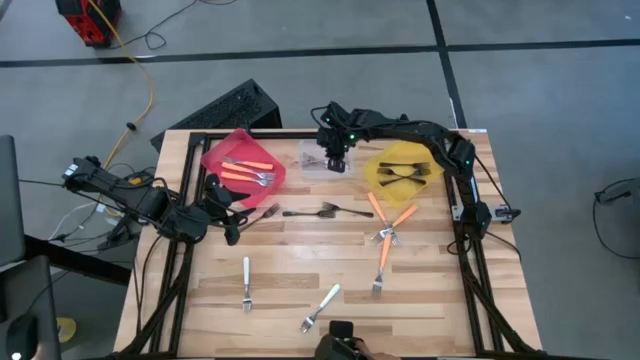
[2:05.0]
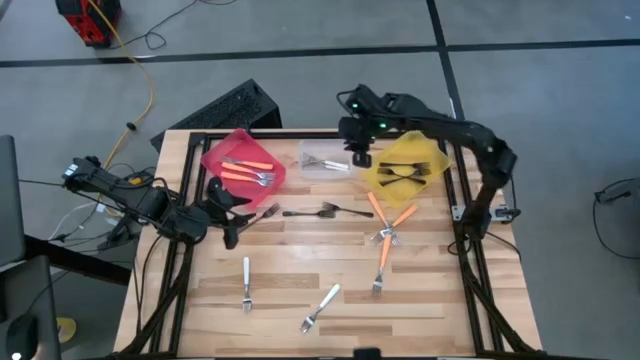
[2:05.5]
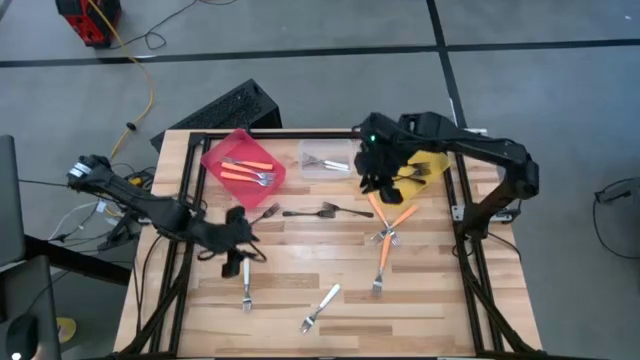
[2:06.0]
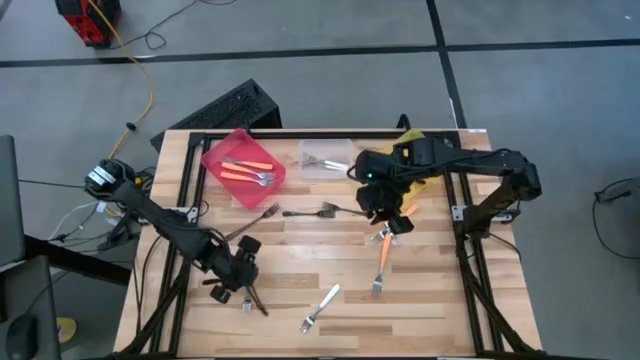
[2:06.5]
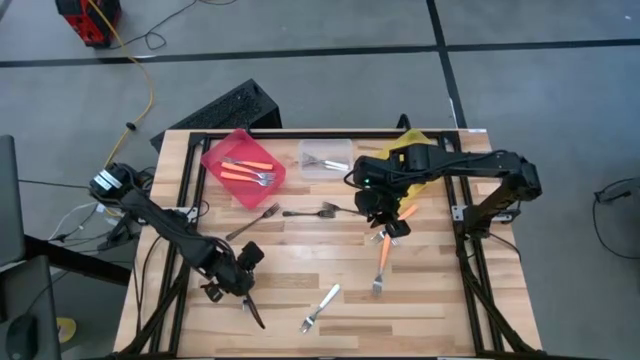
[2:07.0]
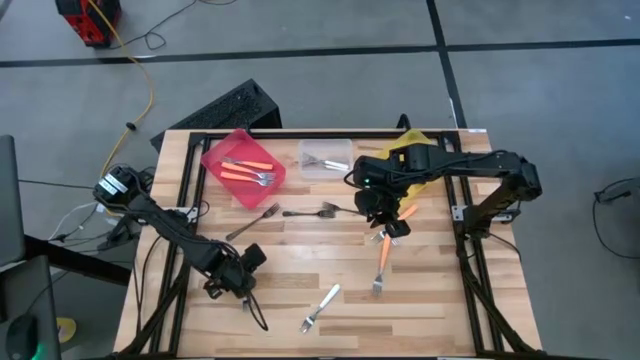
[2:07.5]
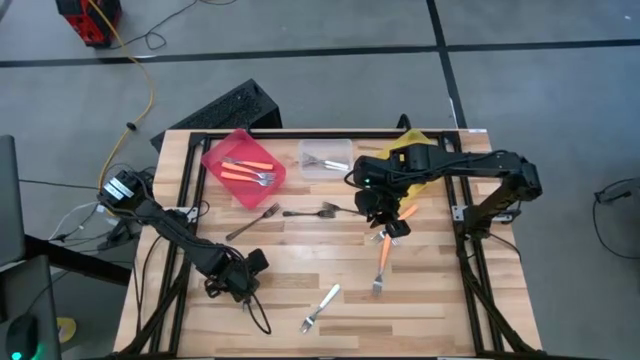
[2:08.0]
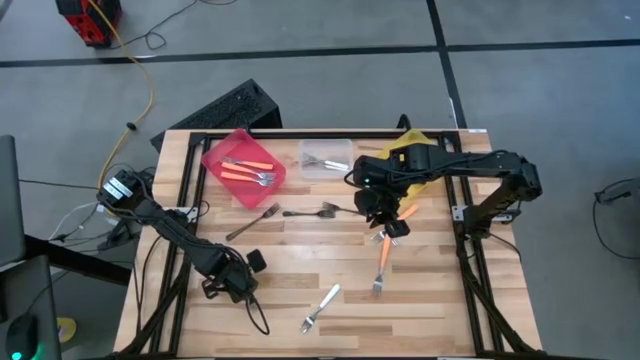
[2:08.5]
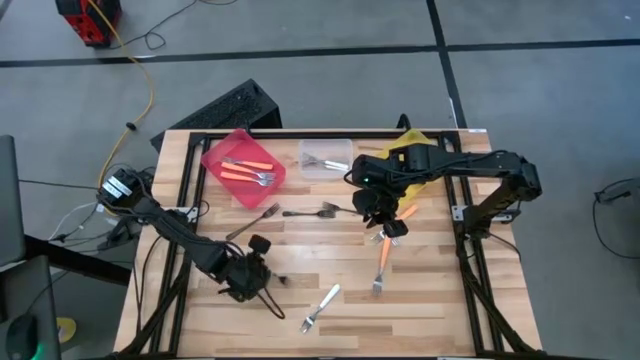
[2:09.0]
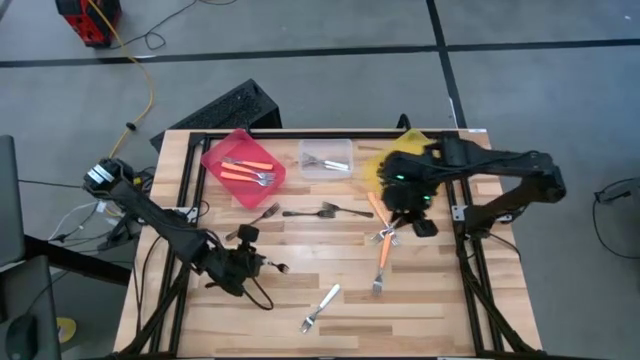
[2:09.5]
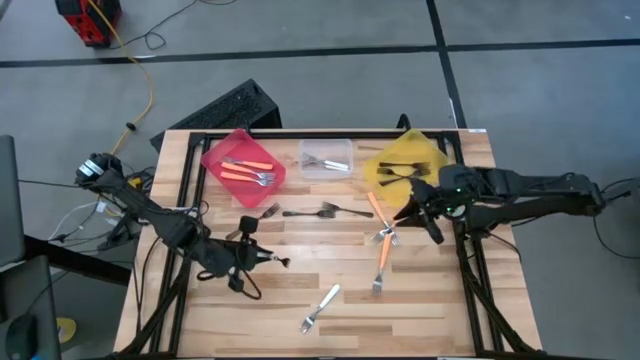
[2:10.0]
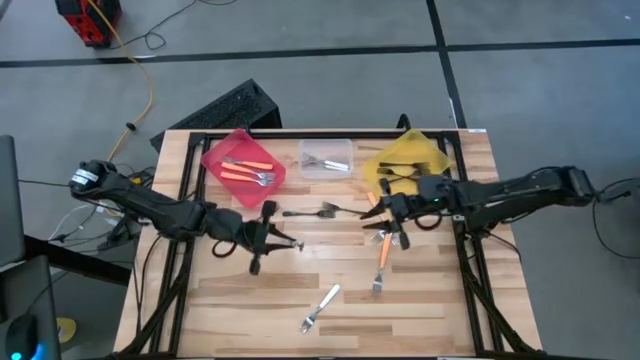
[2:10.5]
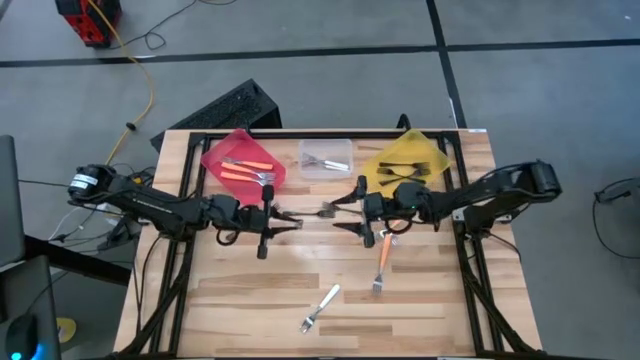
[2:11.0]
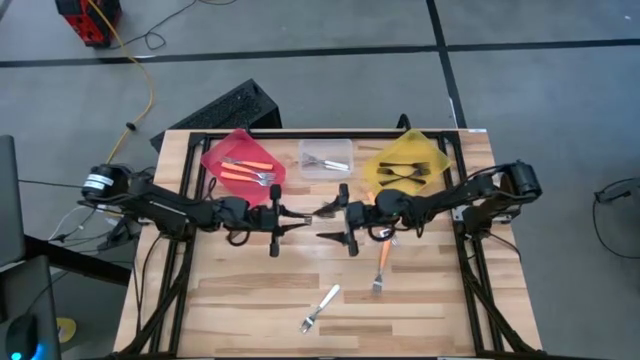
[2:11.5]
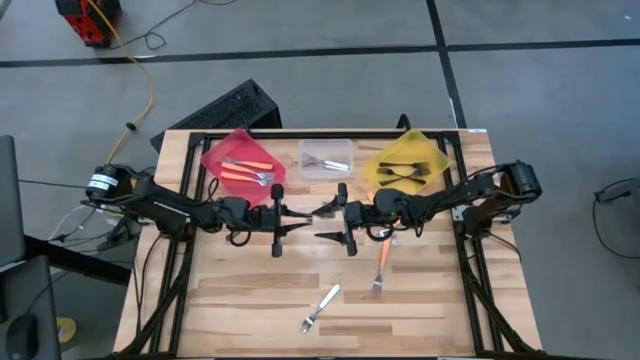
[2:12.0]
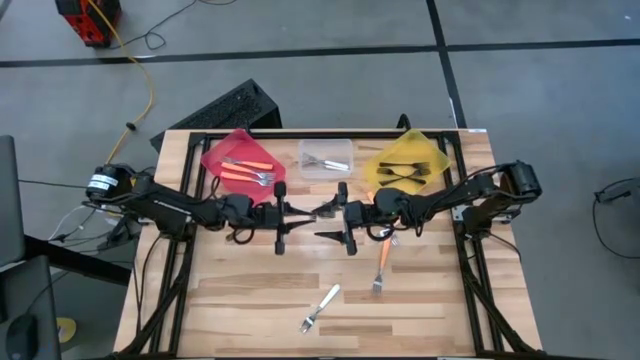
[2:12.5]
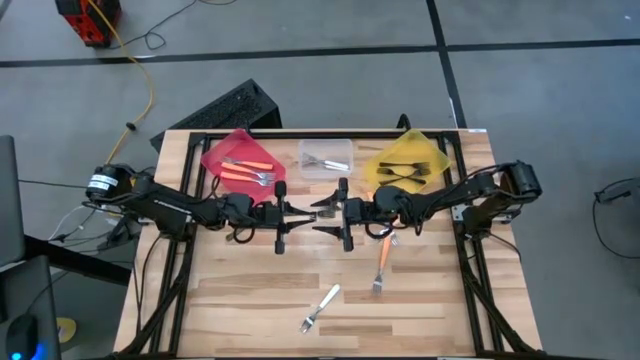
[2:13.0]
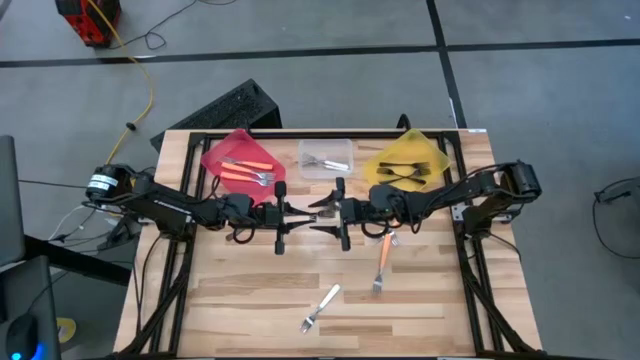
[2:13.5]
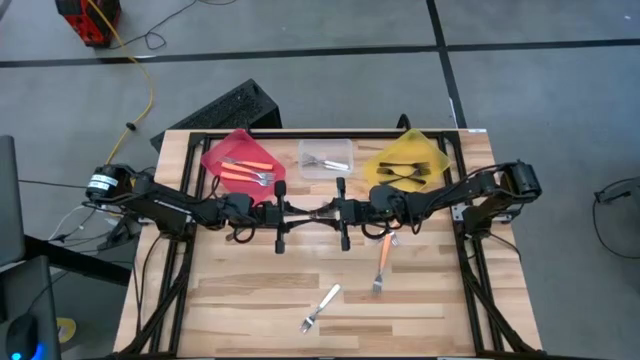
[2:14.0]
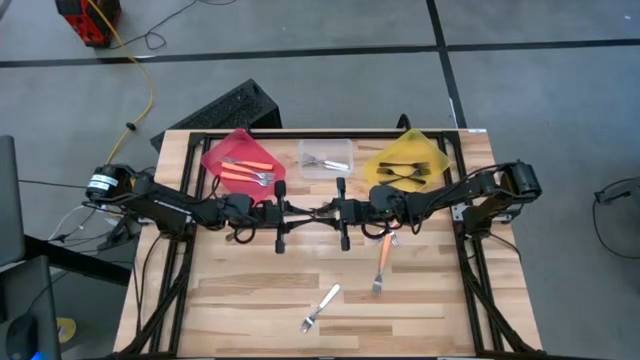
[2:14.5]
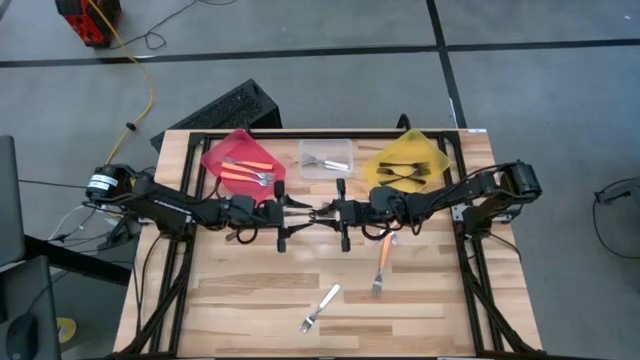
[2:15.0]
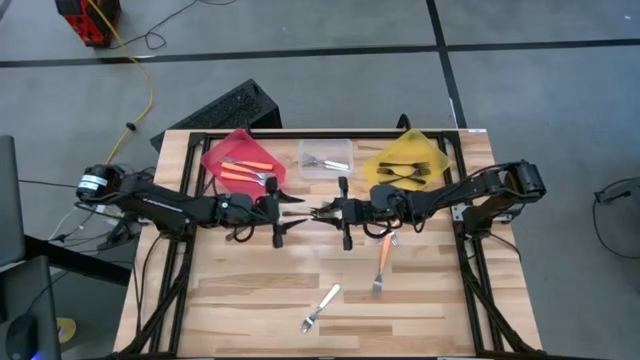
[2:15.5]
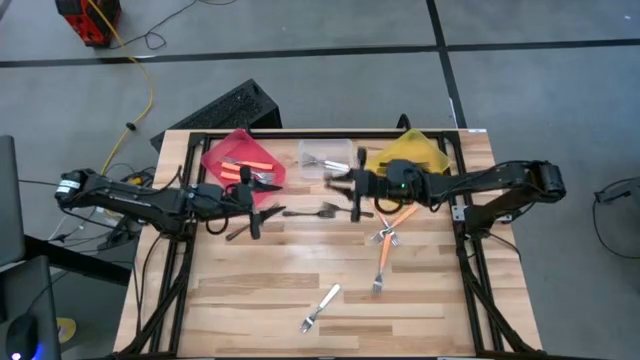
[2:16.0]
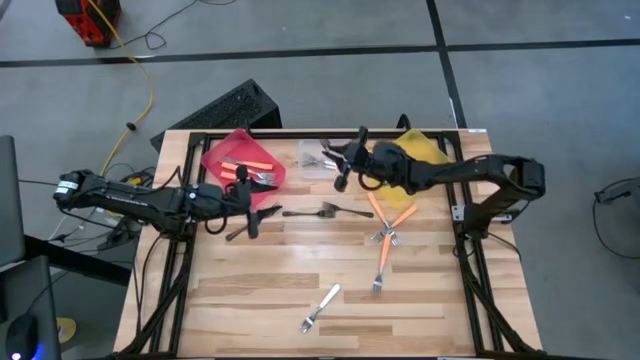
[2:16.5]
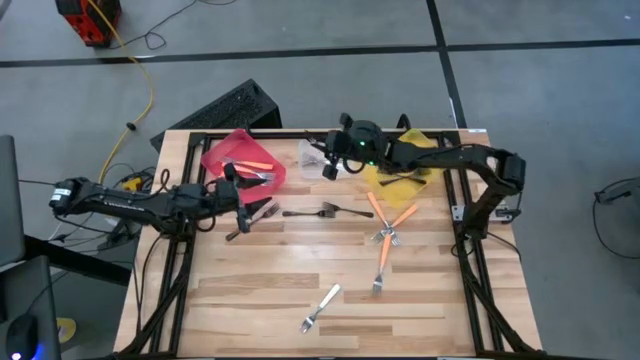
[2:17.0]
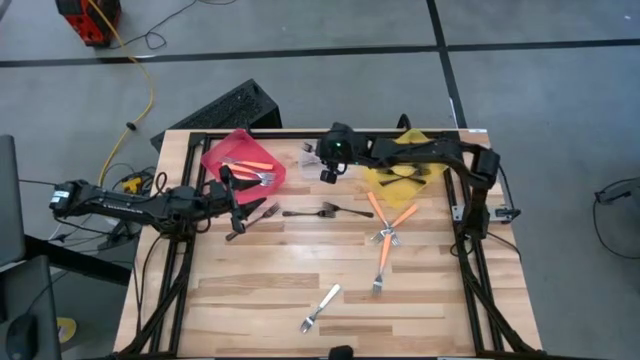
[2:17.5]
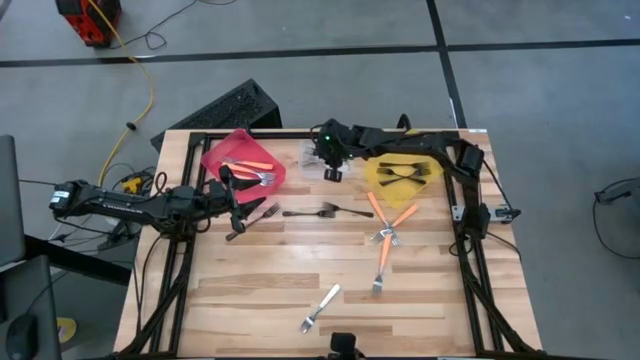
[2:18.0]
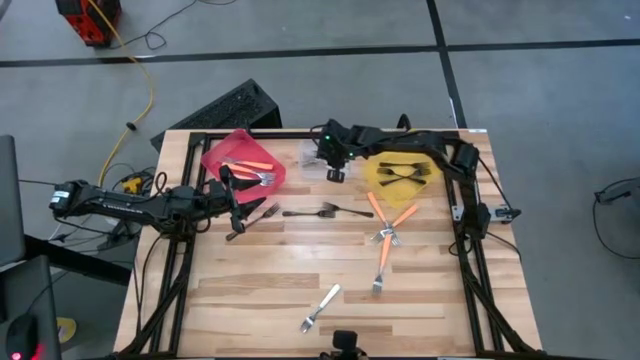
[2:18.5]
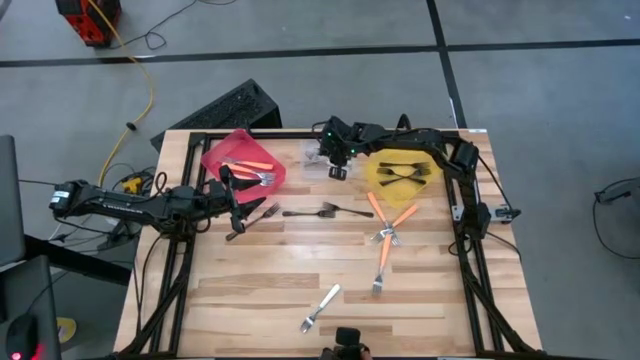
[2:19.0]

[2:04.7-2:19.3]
Task: Sort silverware by color (type)
Put the white fork into the transparent bin

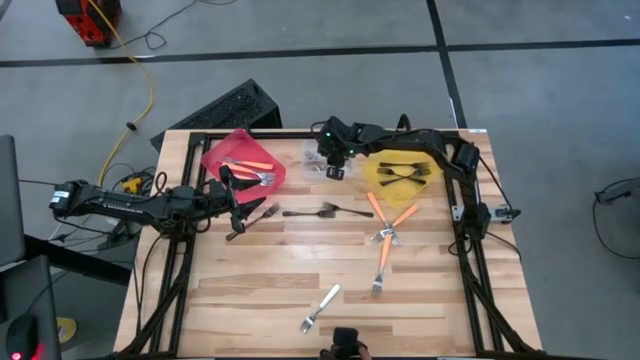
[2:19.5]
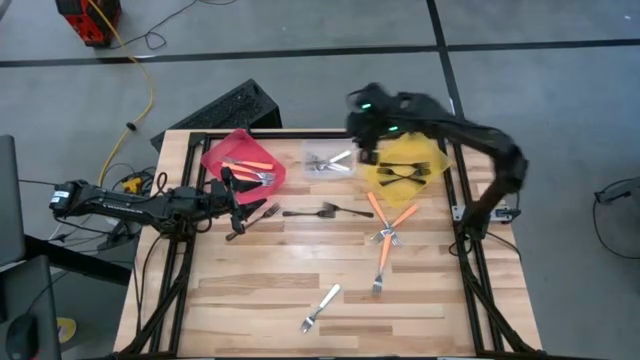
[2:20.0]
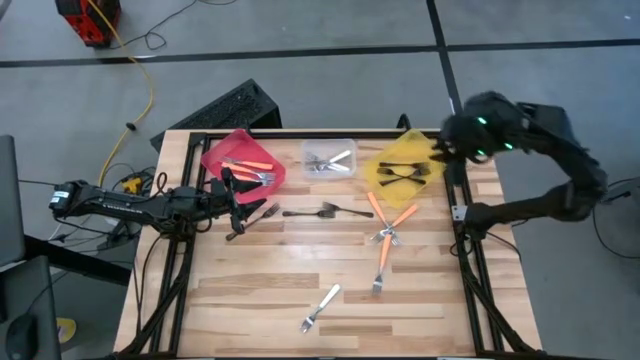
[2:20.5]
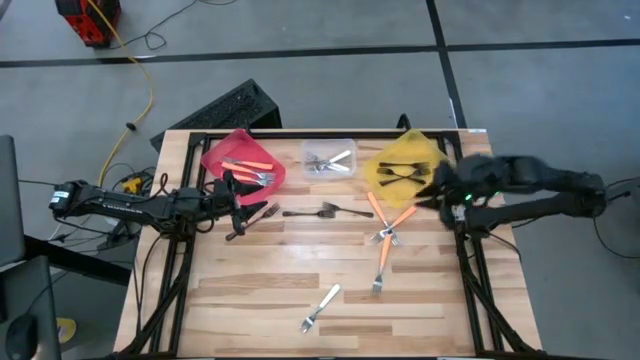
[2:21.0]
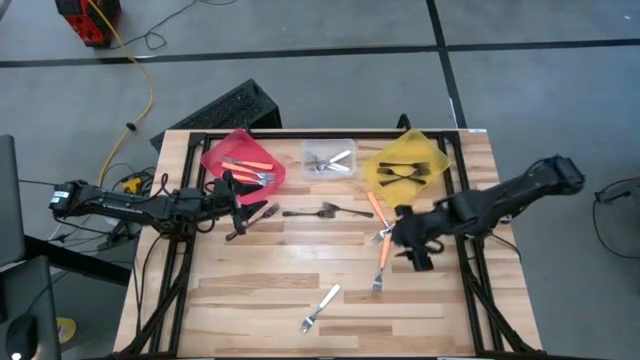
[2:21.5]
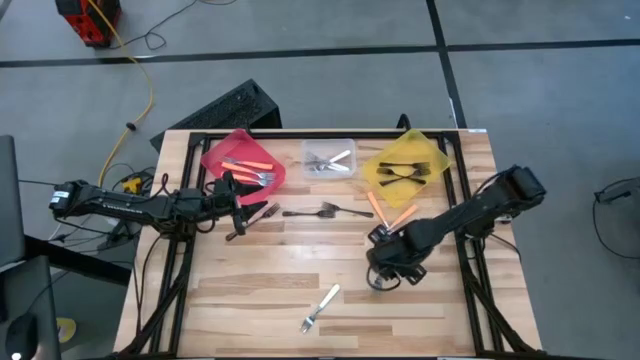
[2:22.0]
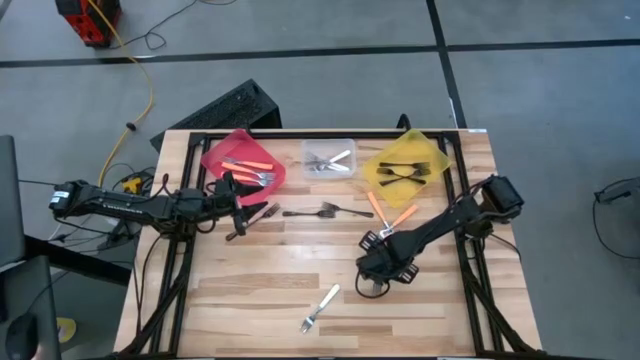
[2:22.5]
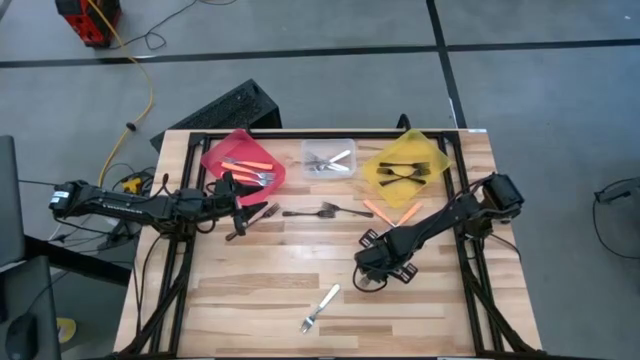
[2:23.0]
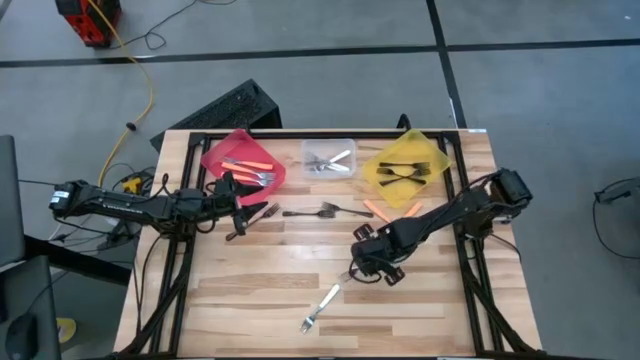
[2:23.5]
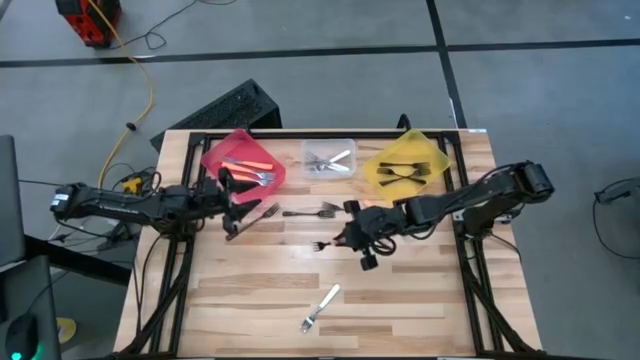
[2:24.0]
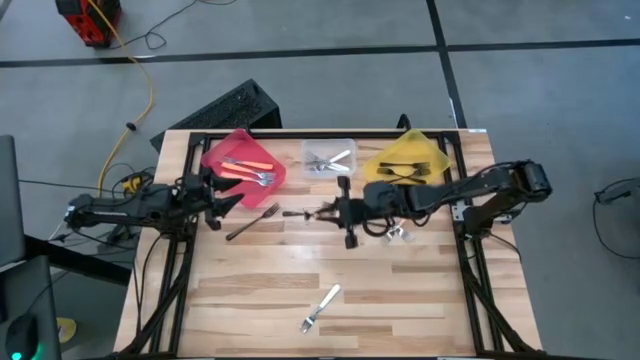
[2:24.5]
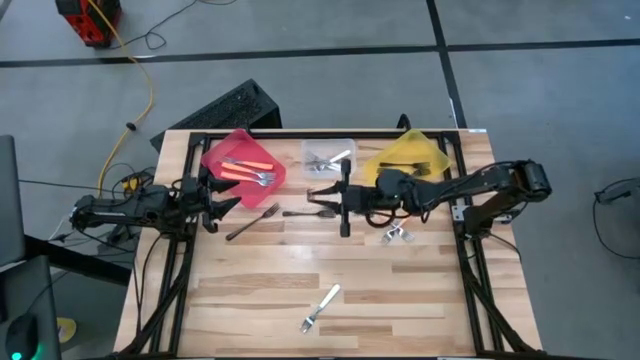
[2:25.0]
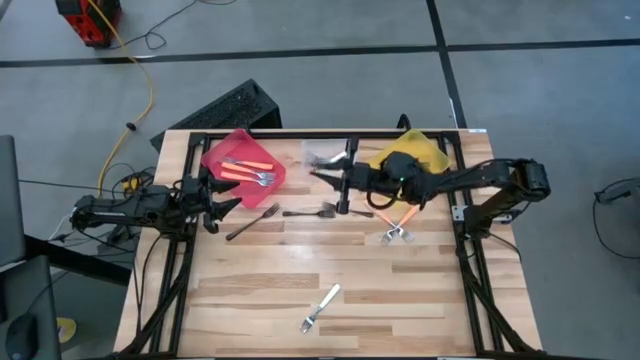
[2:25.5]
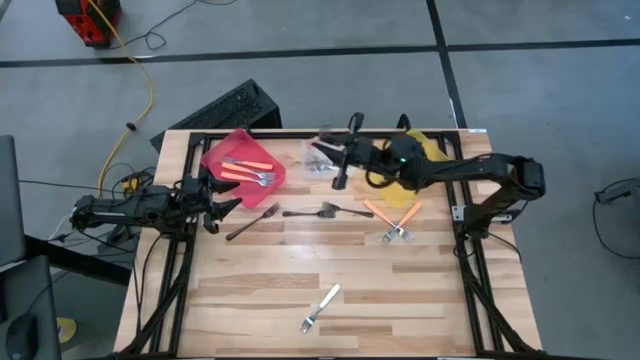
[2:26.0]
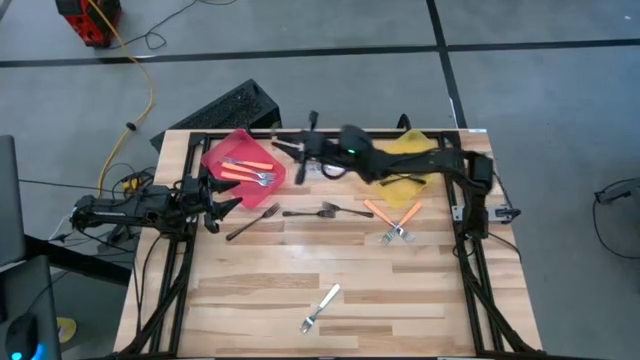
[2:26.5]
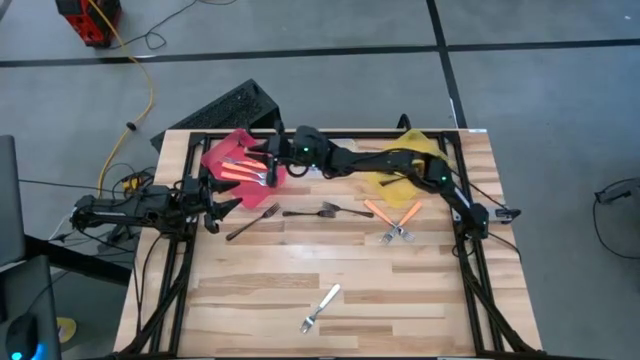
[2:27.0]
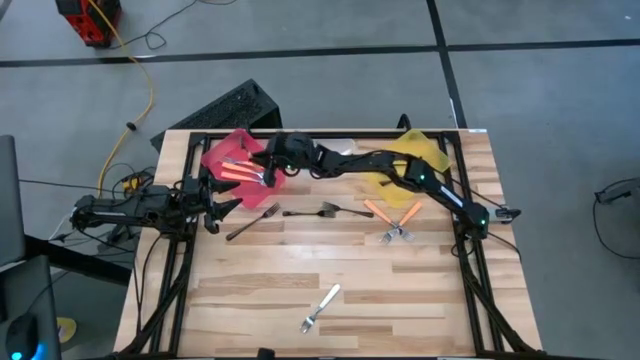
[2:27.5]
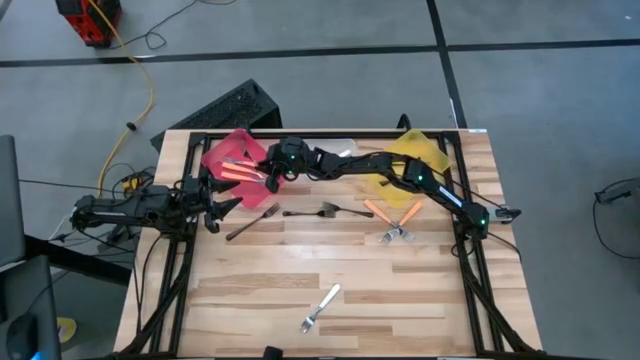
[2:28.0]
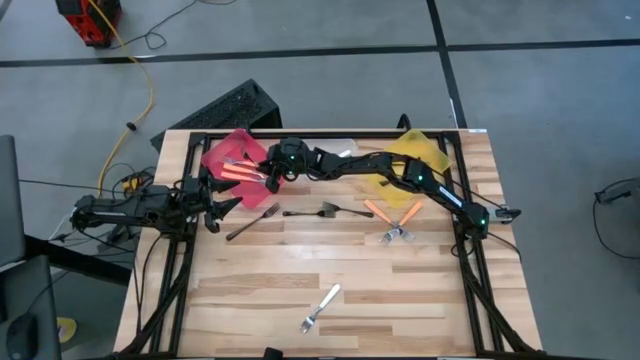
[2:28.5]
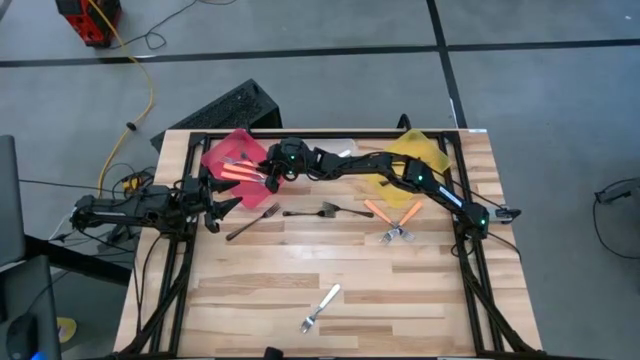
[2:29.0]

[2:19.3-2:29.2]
Put the orange fork into the red bin
